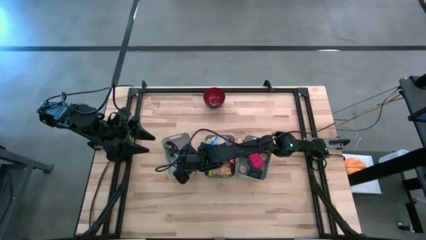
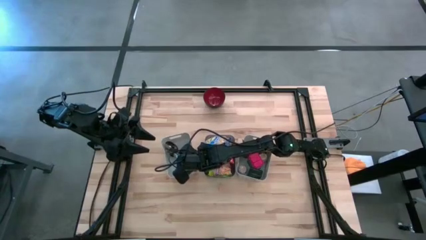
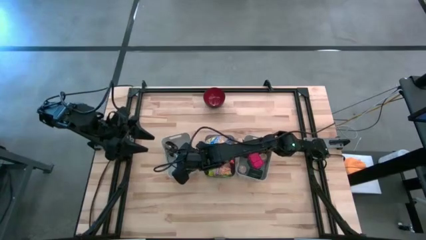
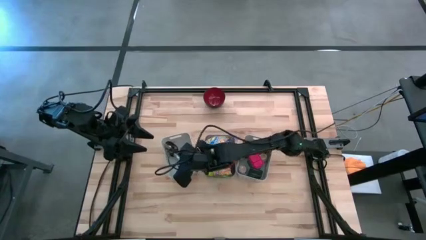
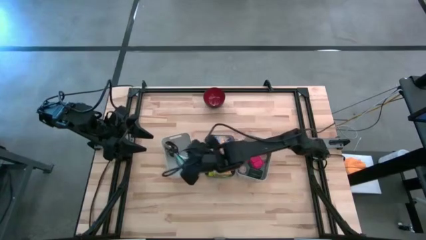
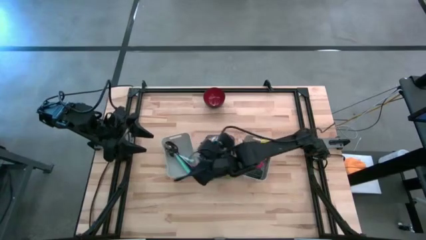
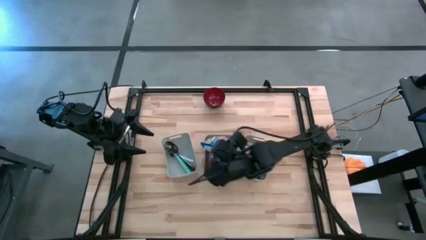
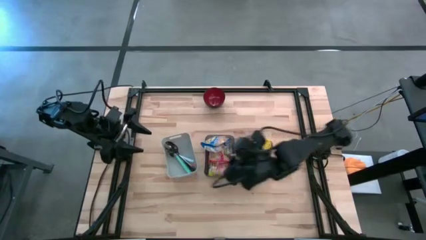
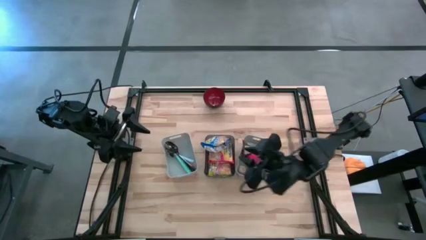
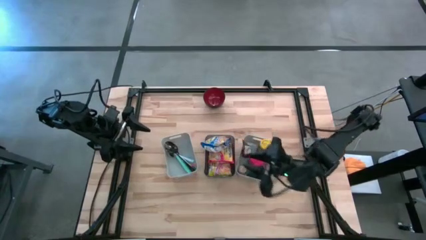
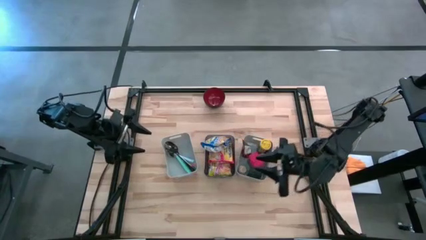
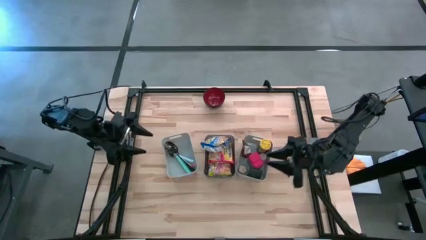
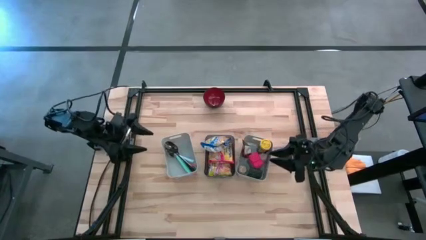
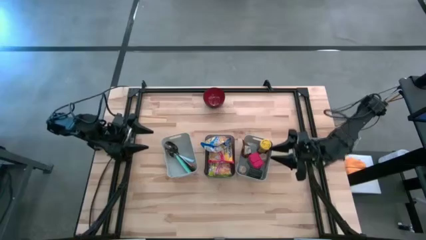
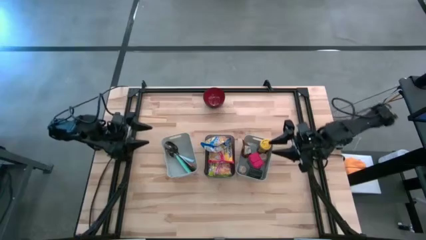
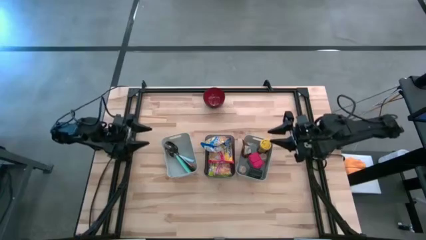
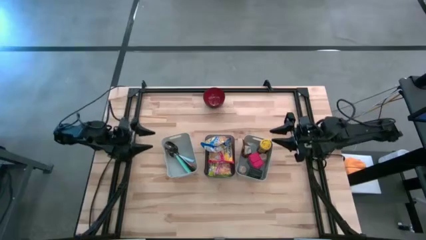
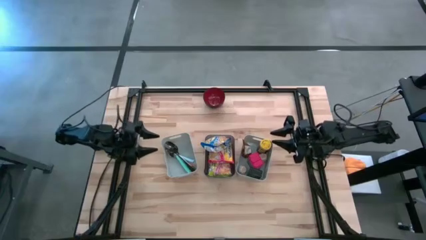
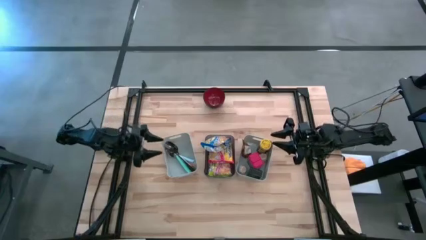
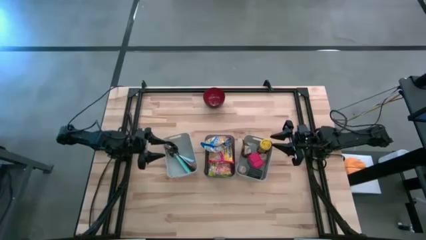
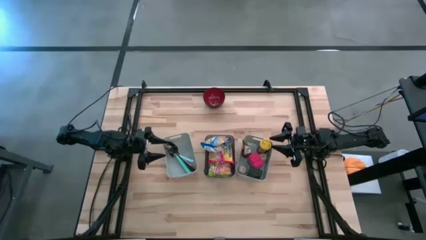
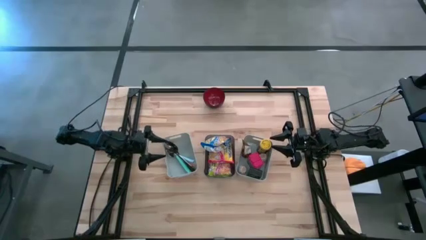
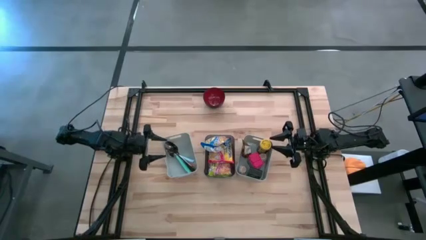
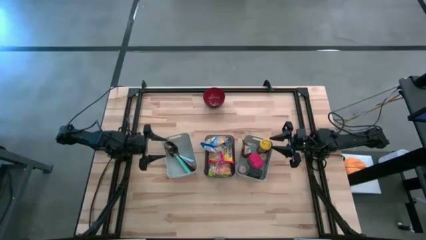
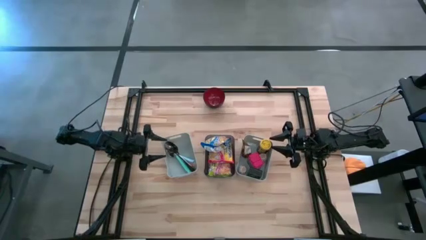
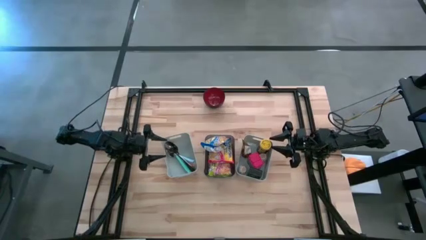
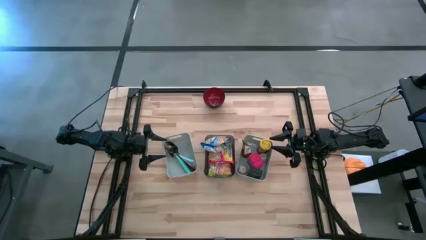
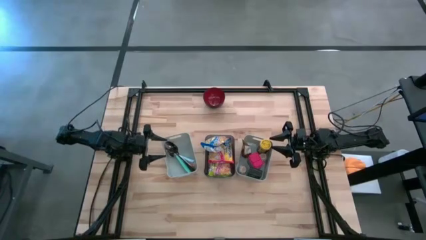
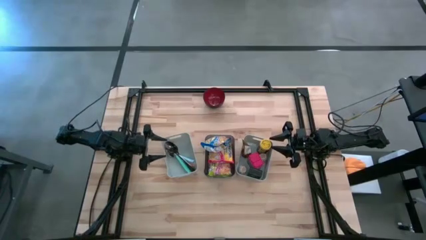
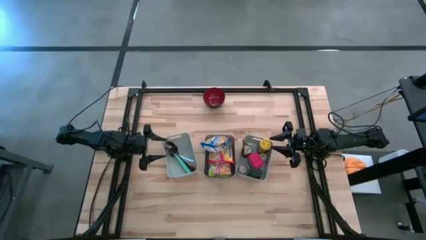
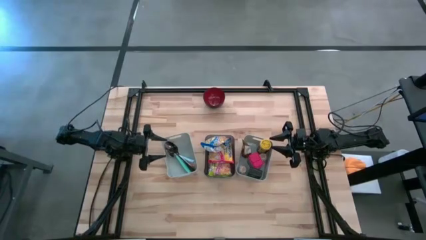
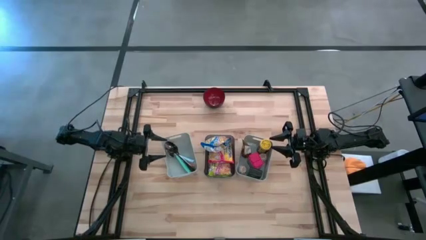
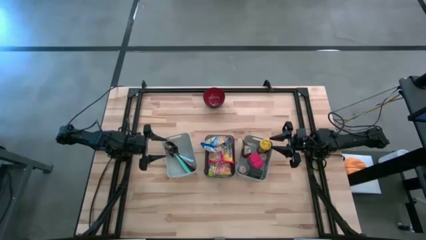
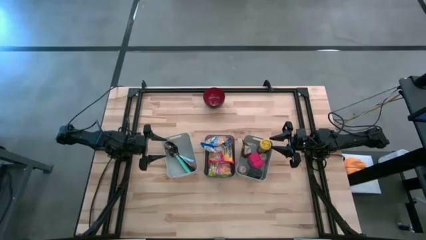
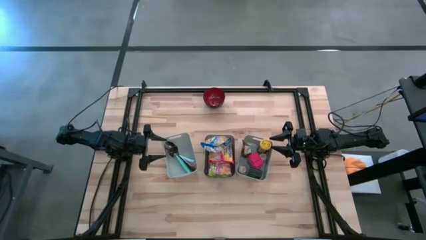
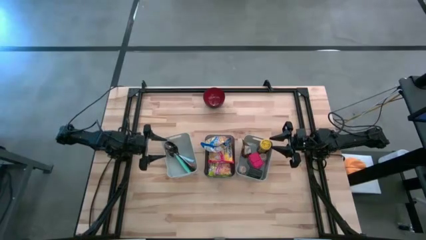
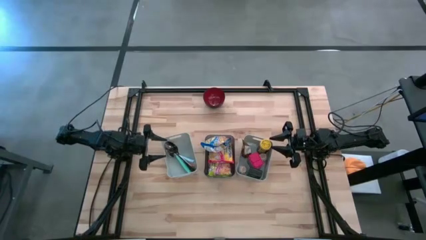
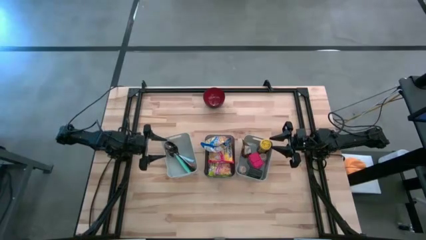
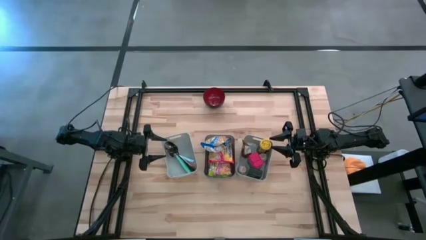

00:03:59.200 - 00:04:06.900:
Return to Home Position

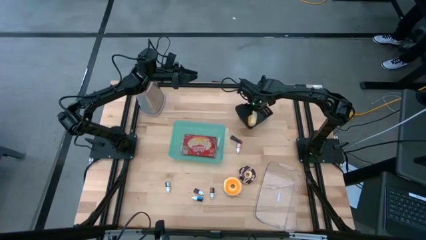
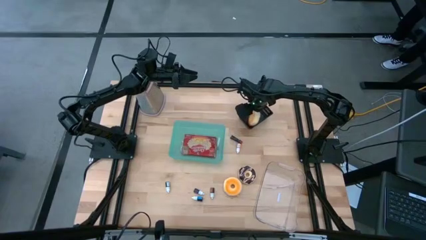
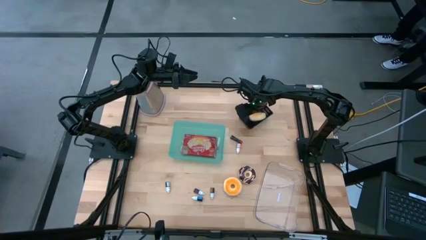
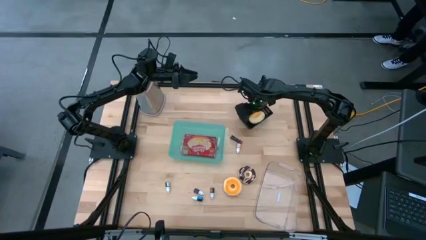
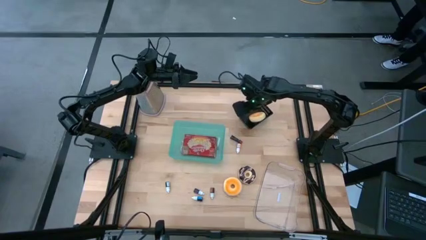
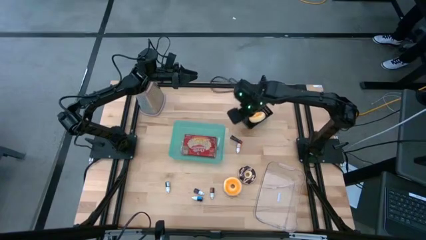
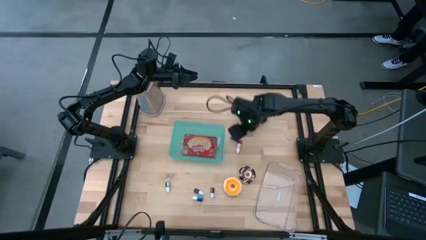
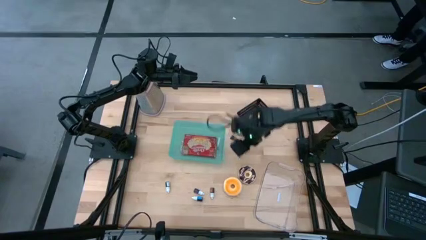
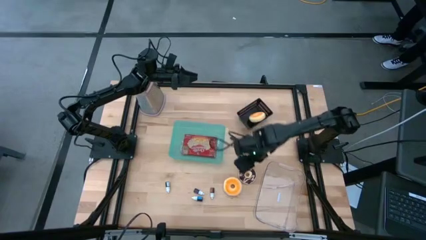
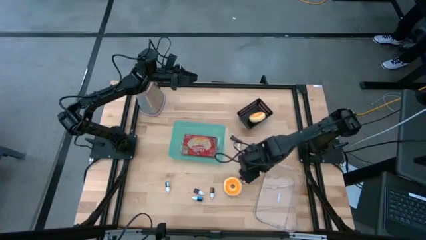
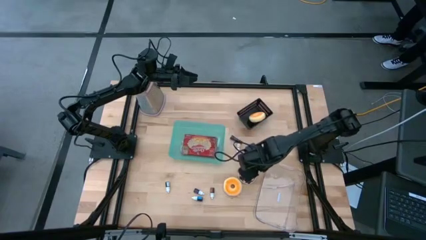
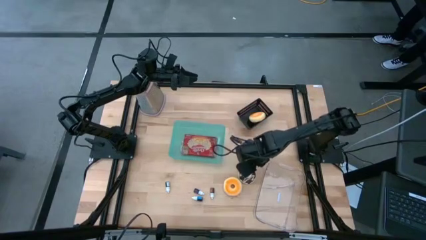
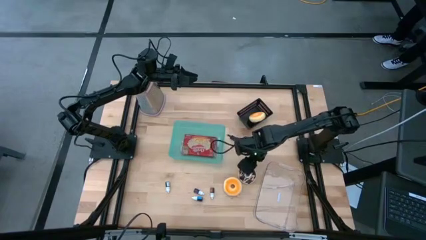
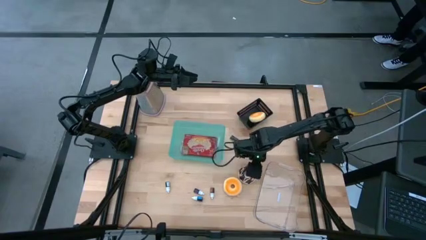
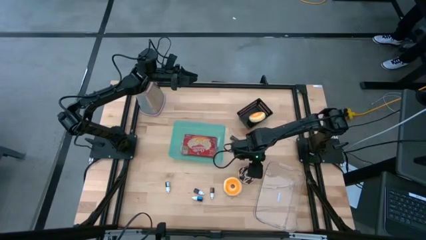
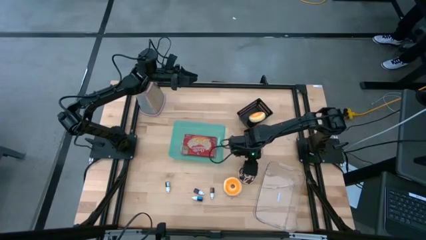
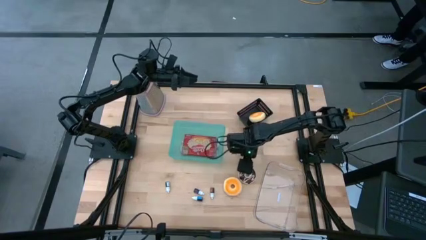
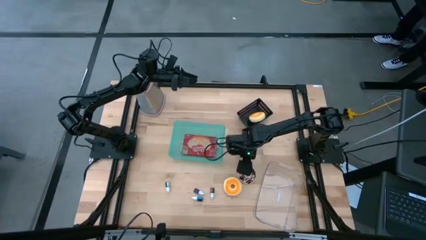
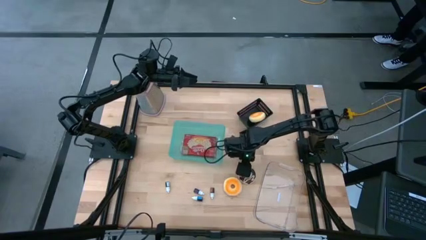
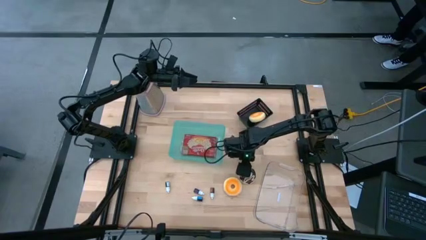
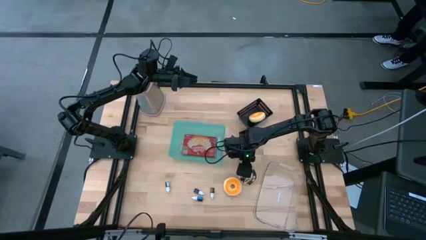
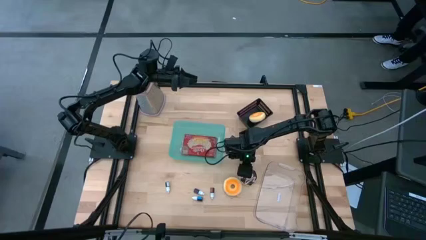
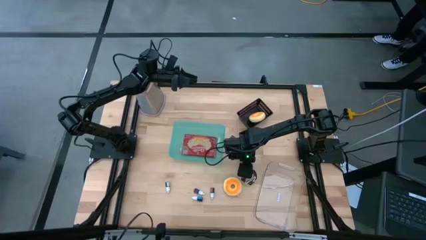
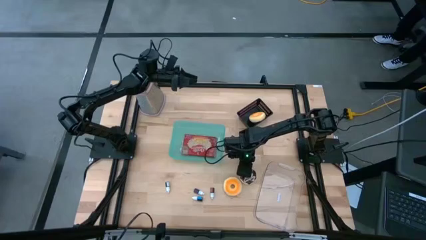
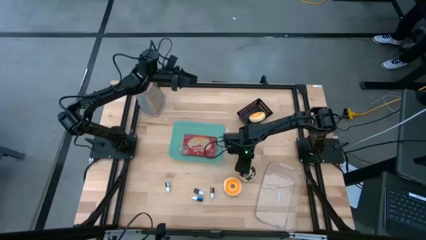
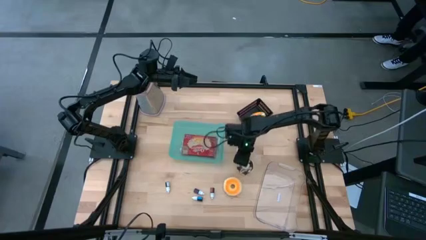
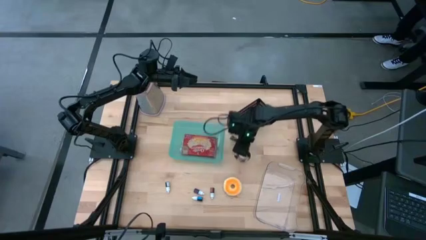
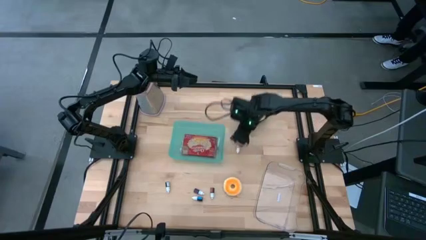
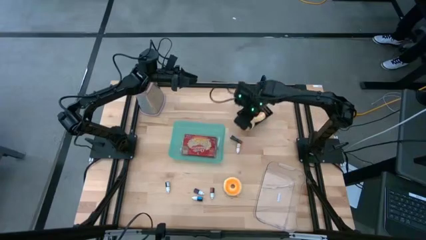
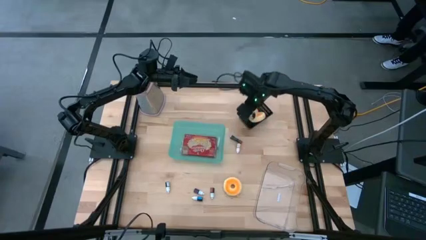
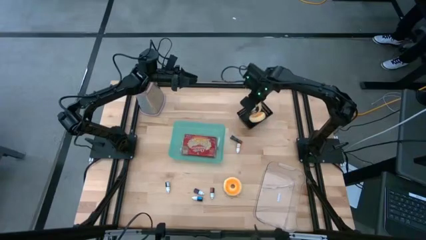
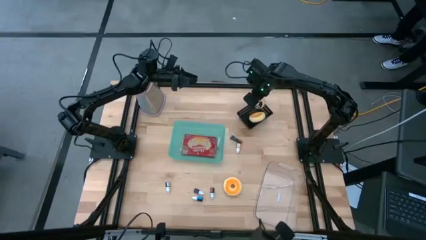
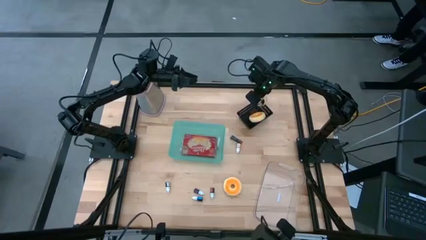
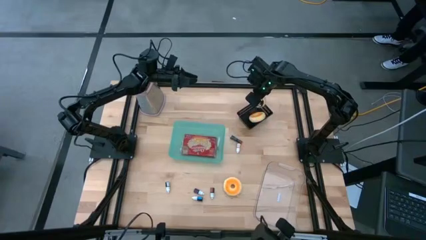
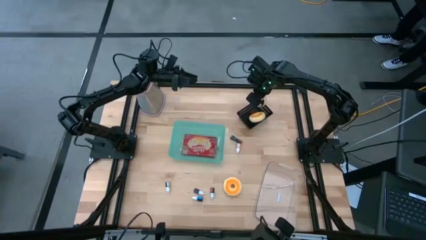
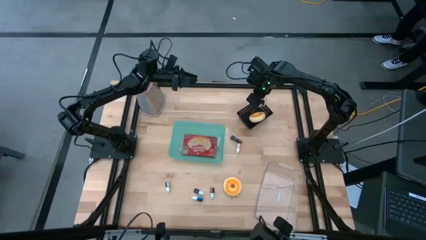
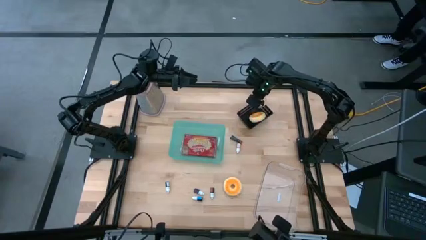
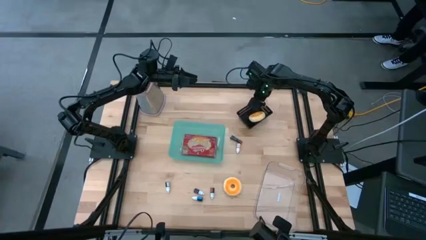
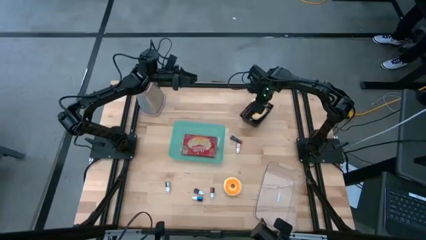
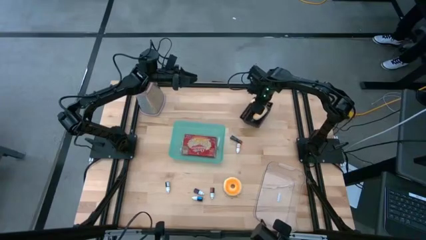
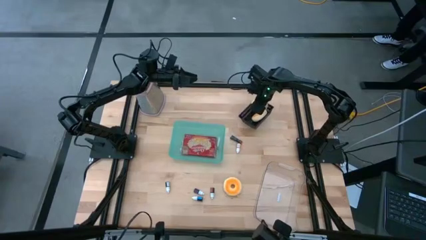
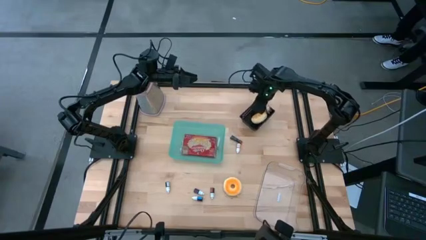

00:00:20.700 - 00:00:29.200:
Put the black donut into the black bin
